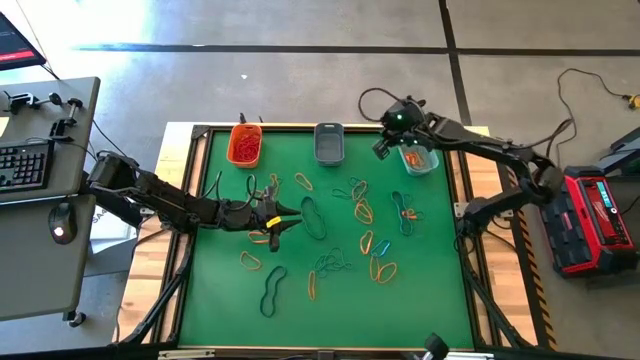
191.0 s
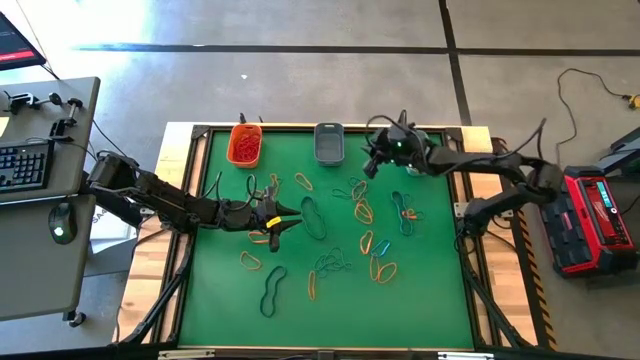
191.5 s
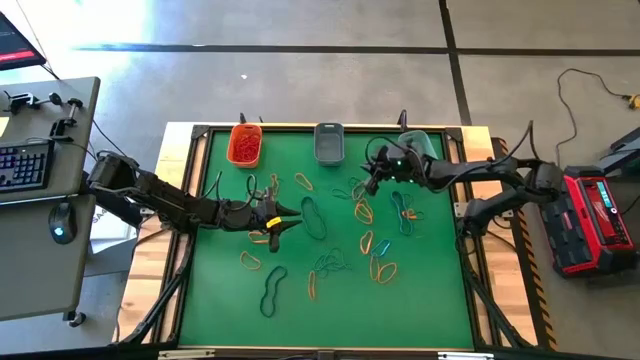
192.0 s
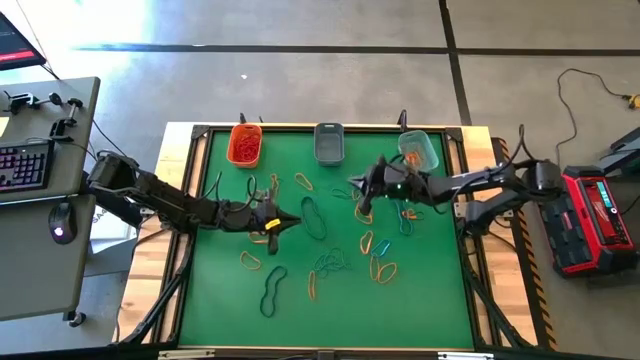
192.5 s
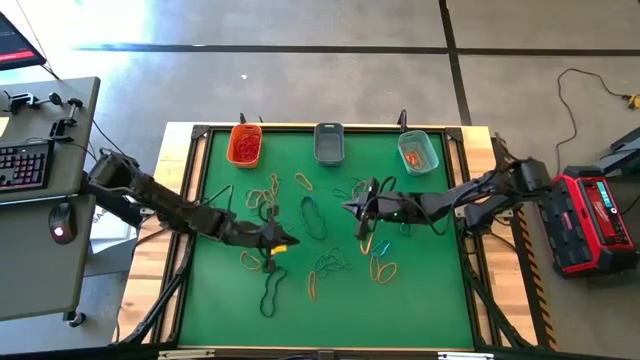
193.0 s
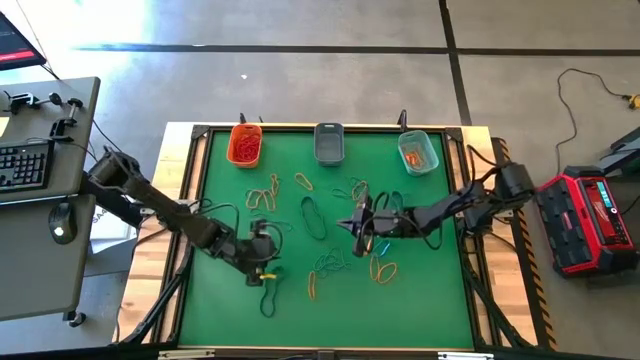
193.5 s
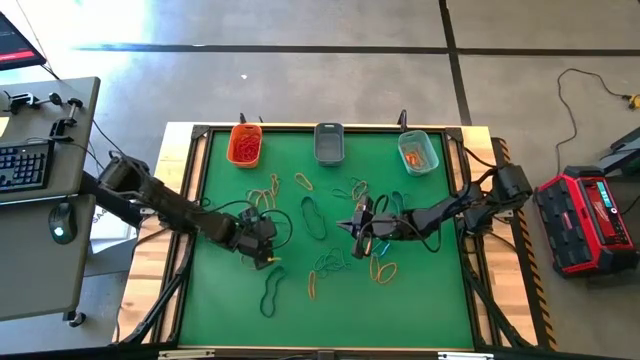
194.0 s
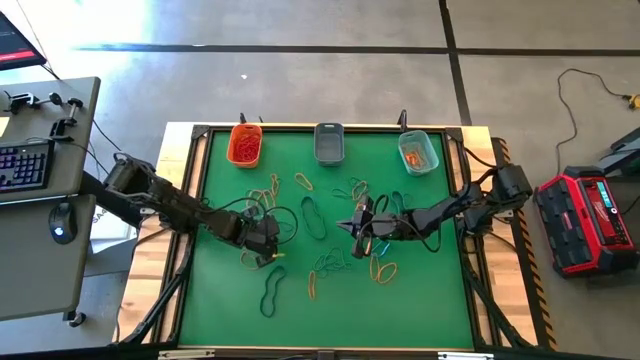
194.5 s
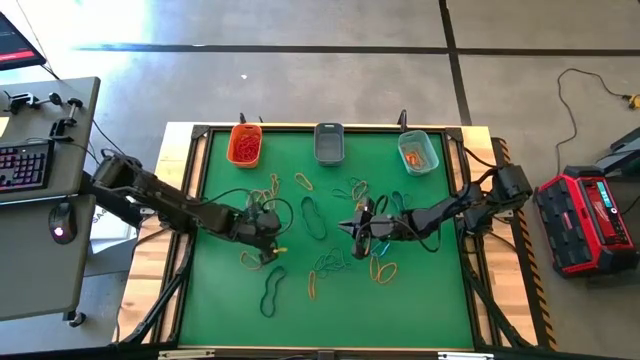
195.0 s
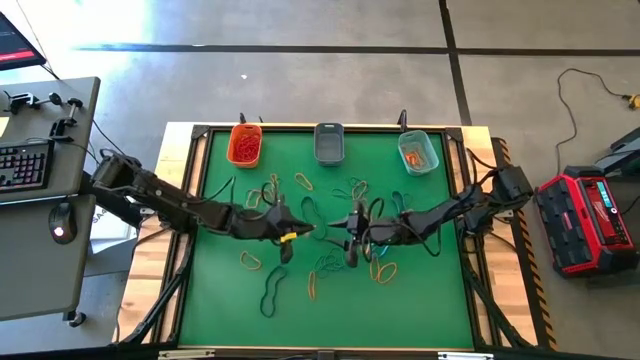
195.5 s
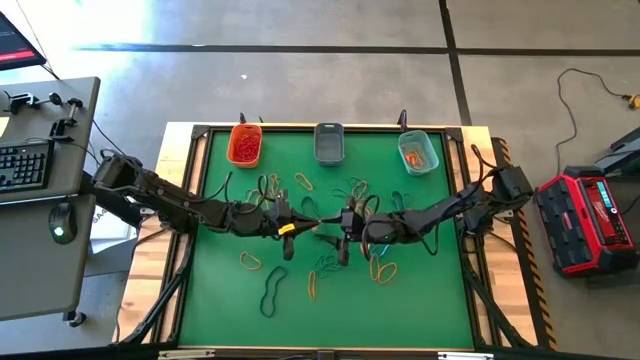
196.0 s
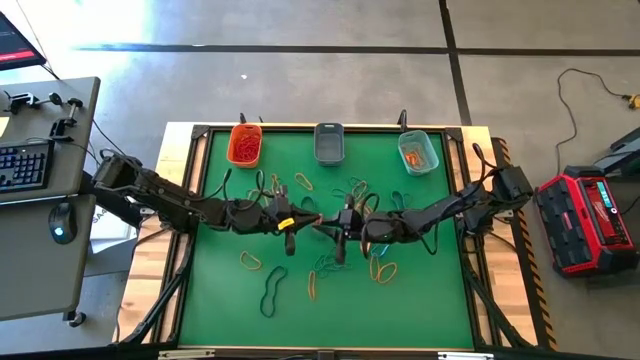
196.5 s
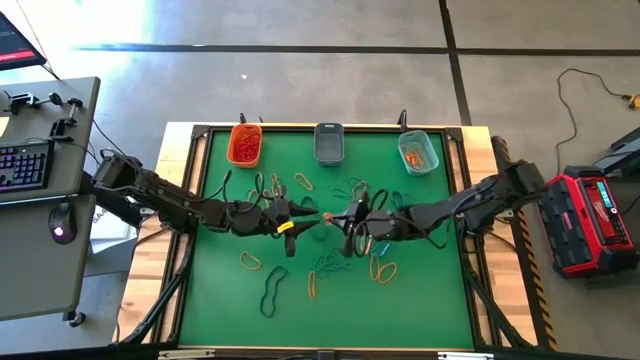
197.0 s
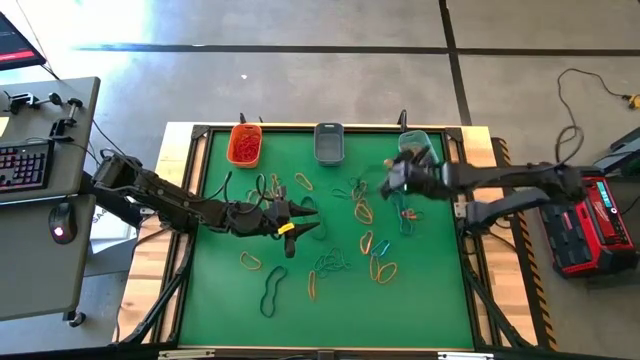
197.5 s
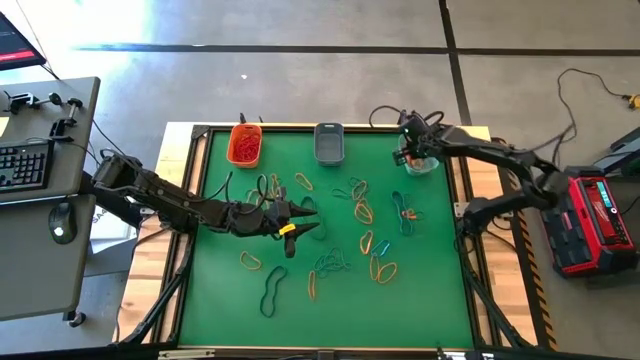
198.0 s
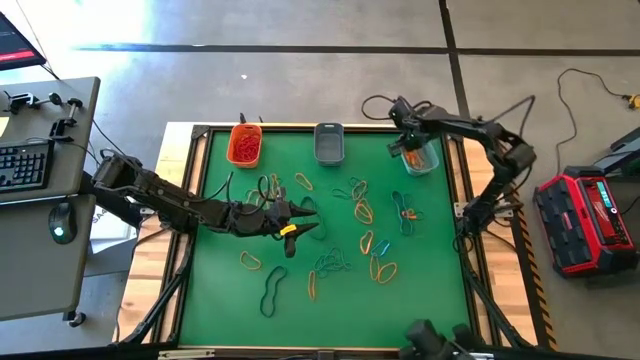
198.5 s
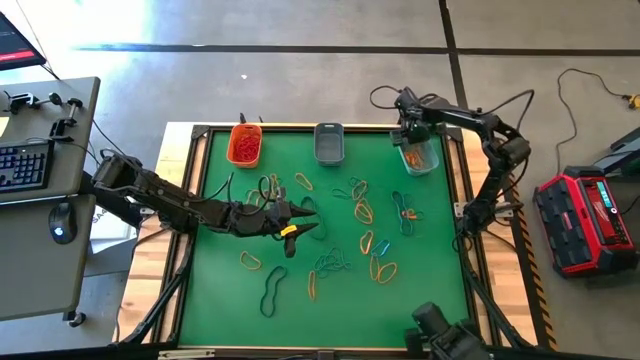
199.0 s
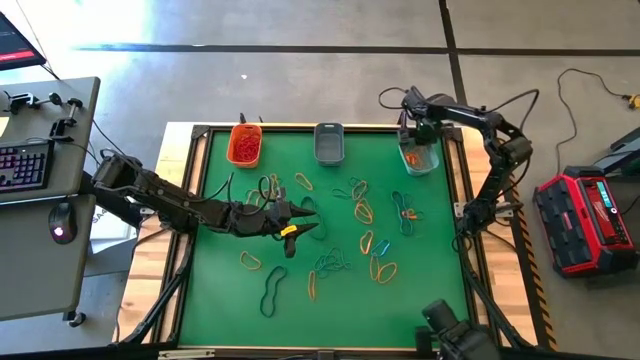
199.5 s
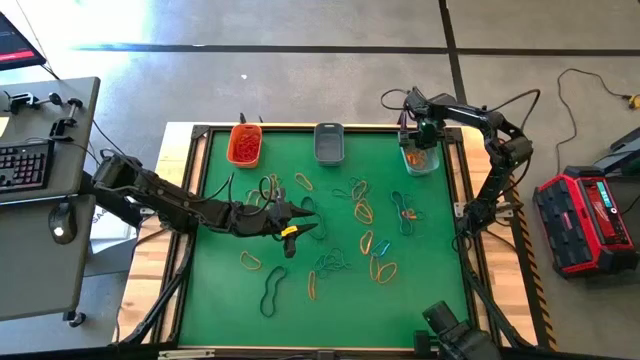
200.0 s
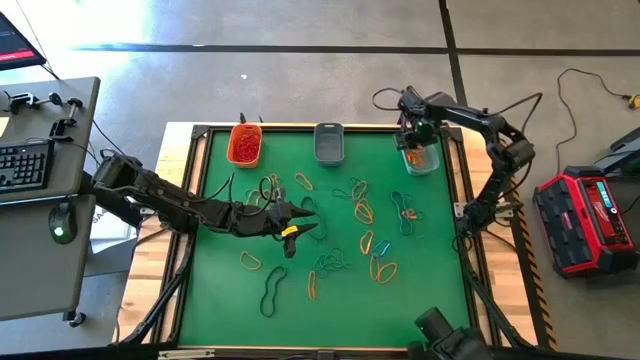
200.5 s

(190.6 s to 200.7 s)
Task: Sort rubber bands into baskets
Put the orange rubber band into the green bin

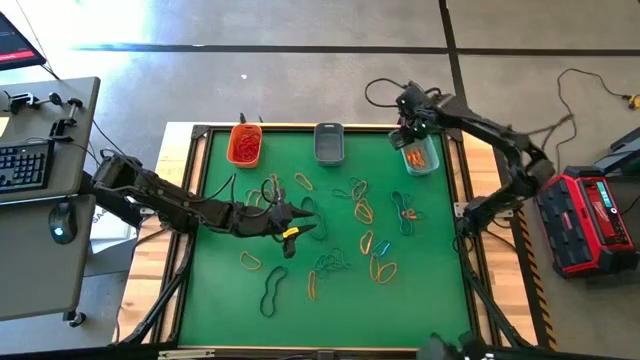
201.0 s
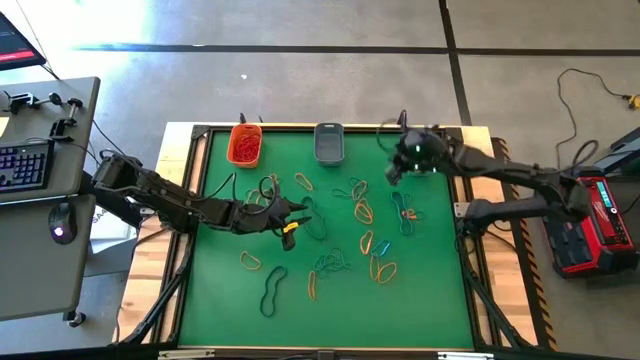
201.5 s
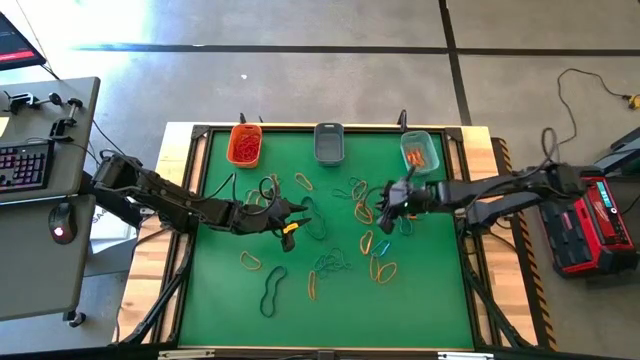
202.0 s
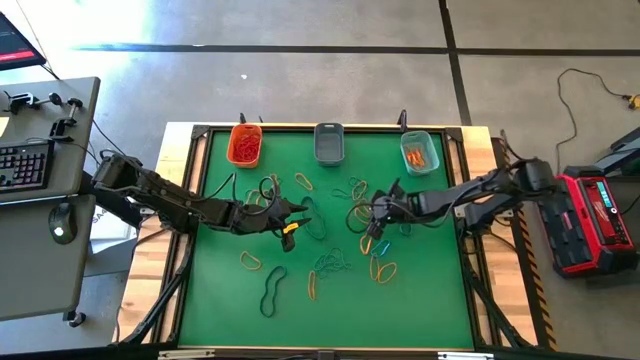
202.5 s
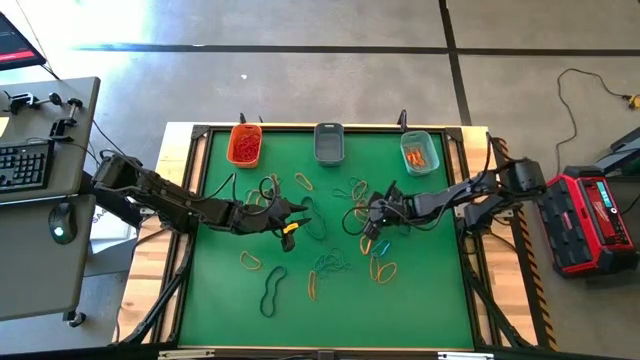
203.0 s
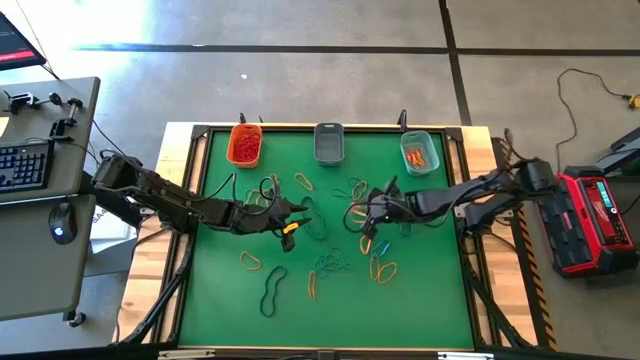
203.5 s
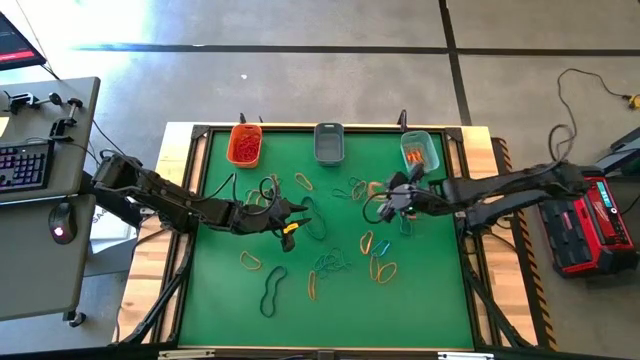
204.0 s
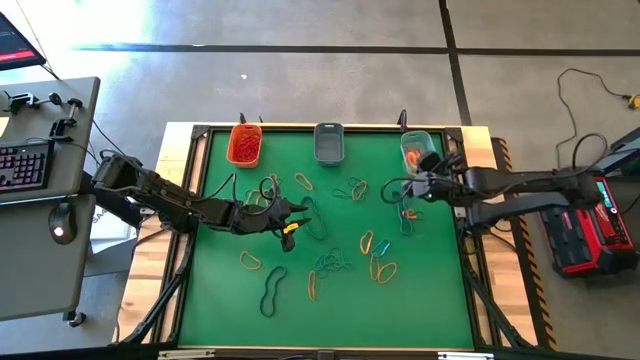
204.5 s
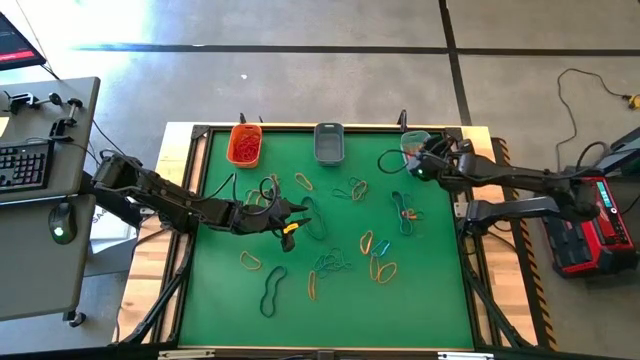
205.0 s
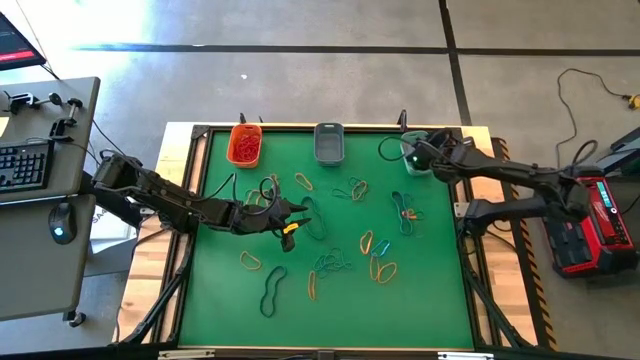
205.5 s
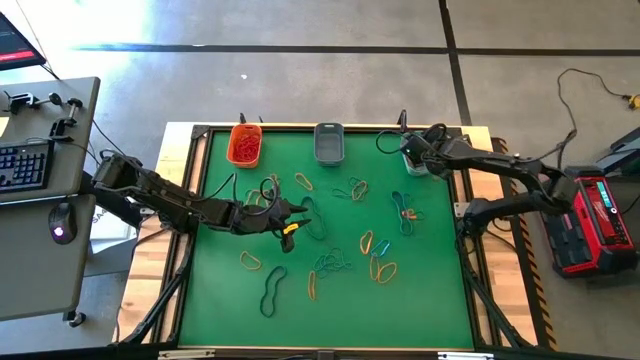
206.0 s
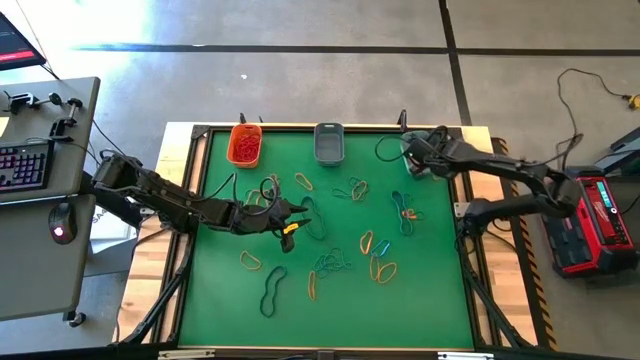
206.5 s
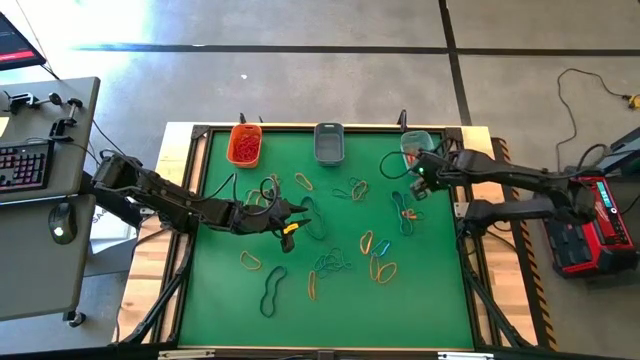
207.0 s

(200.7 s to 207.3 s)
Put the orange rubber band into the green bin

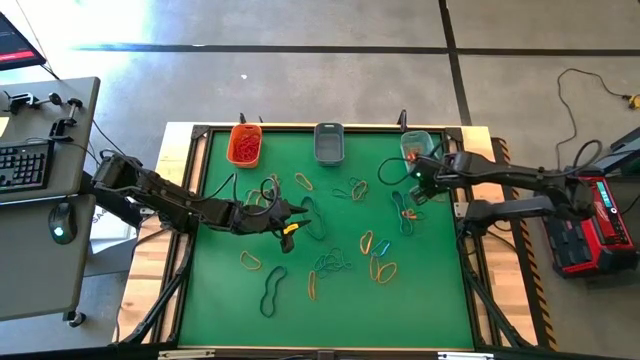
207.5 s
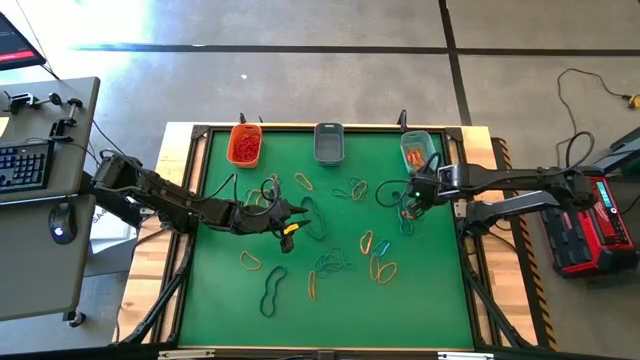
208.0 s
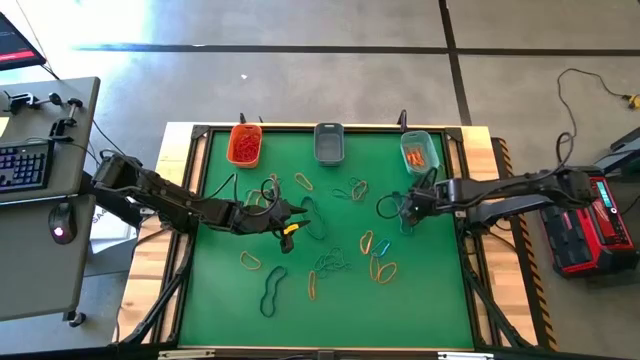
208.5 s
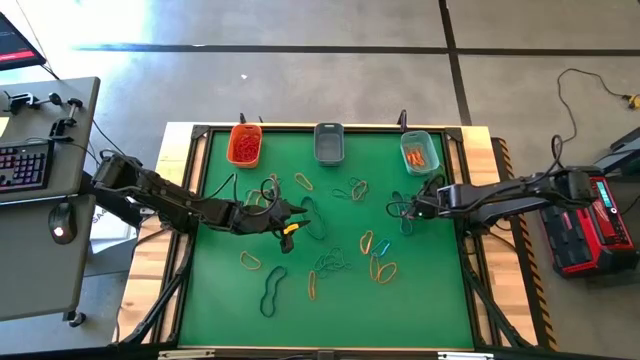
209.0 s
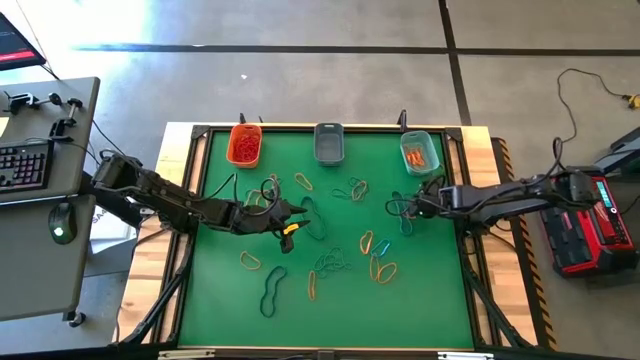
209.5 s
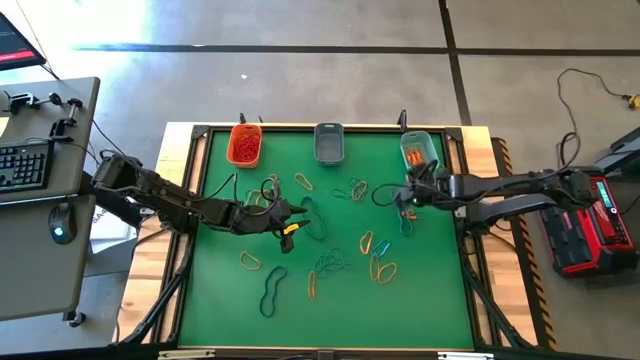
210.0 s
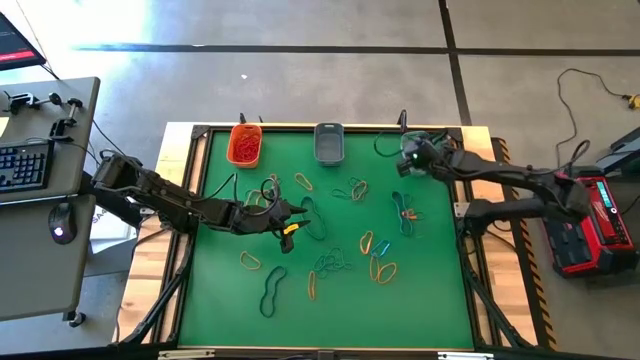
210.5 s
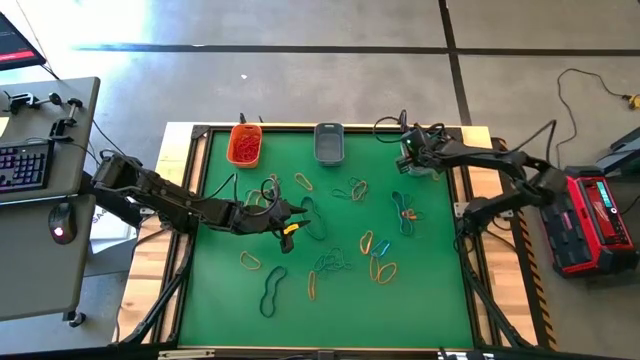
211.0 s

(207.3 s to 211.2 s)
Put the orange rubber band into the green bin

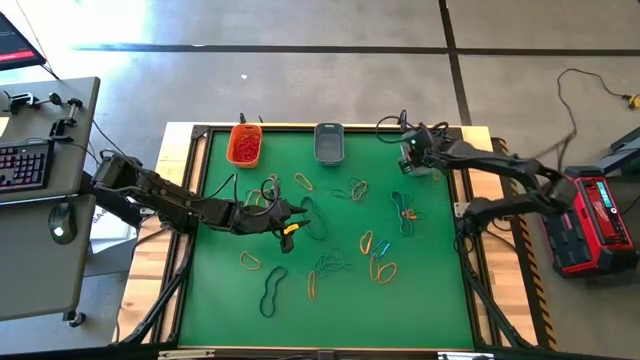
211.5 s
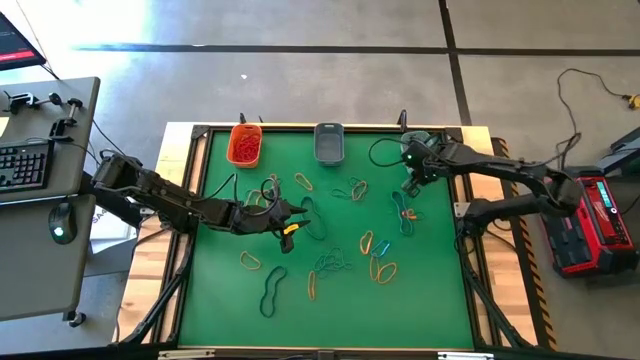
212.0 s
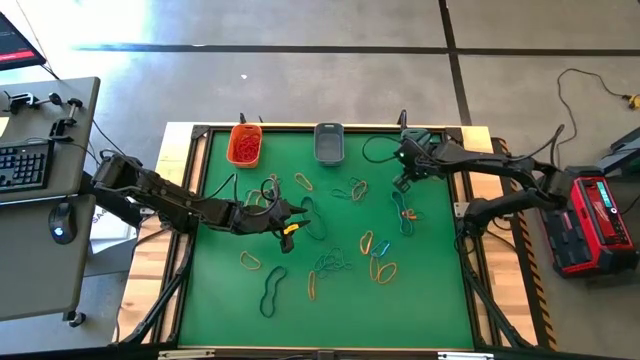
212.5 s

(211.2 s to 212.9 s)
Adjust the green bin
